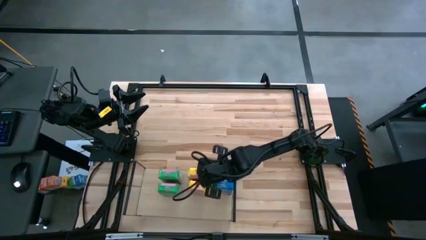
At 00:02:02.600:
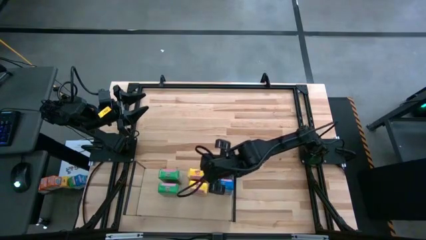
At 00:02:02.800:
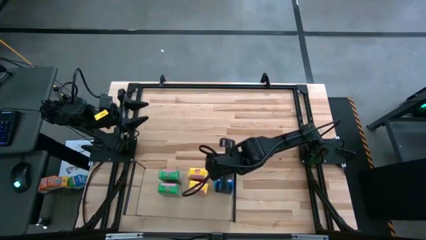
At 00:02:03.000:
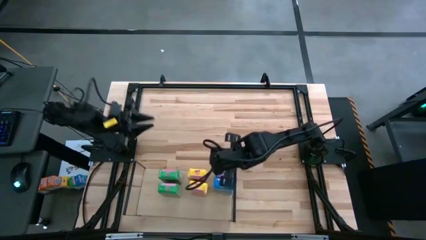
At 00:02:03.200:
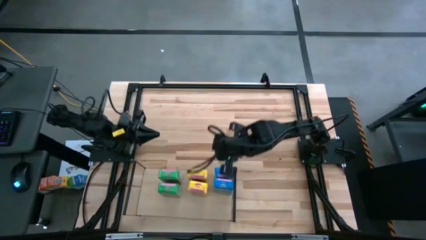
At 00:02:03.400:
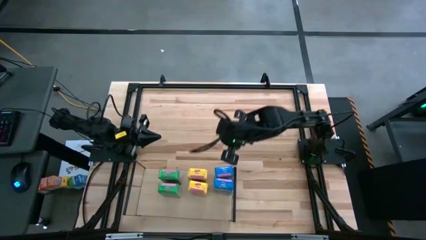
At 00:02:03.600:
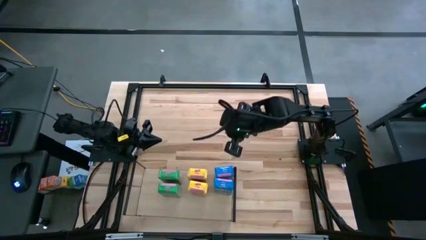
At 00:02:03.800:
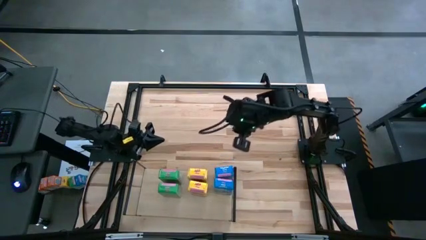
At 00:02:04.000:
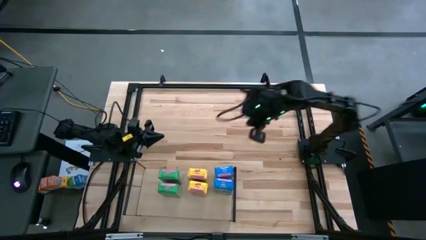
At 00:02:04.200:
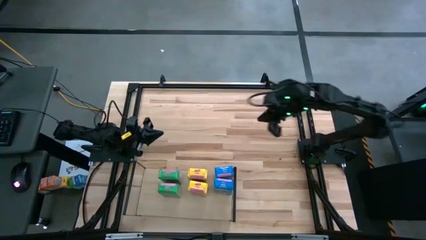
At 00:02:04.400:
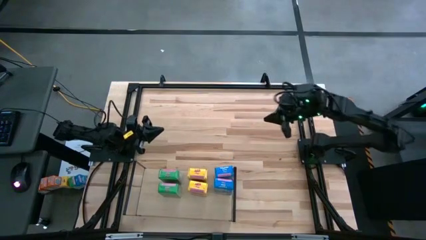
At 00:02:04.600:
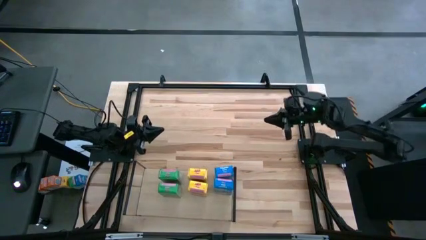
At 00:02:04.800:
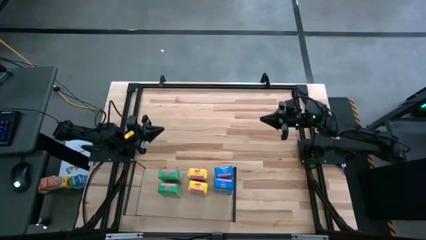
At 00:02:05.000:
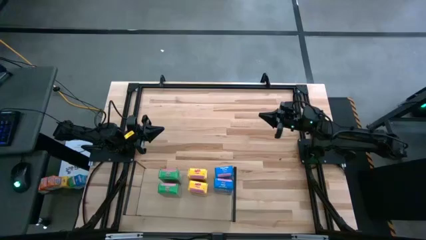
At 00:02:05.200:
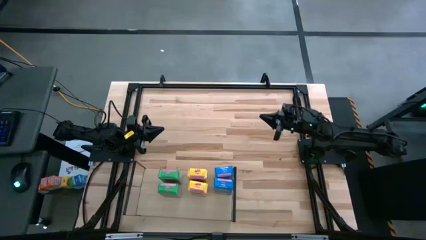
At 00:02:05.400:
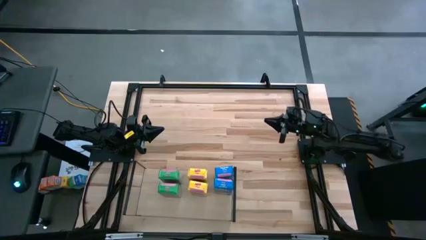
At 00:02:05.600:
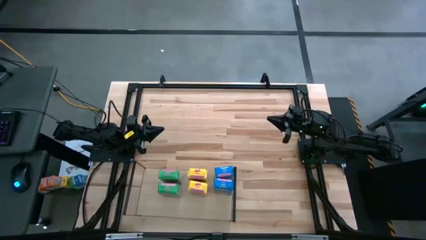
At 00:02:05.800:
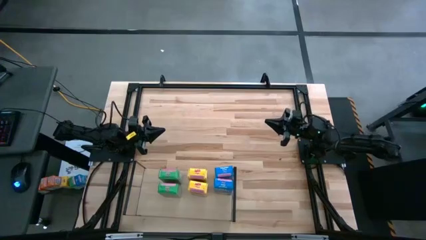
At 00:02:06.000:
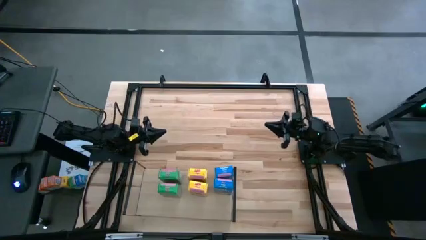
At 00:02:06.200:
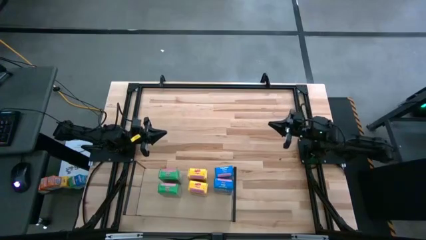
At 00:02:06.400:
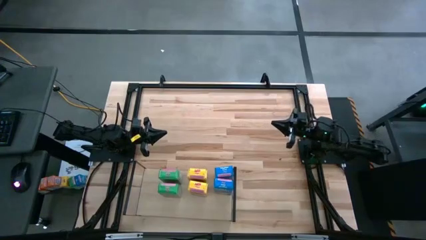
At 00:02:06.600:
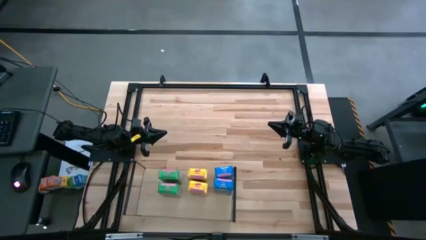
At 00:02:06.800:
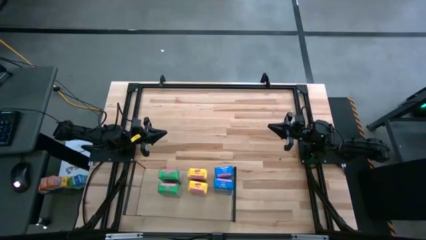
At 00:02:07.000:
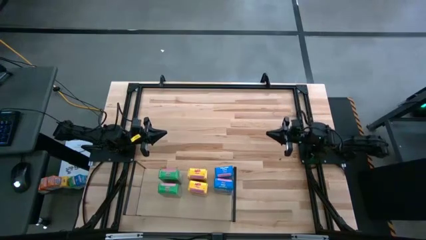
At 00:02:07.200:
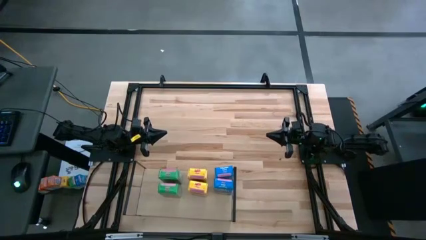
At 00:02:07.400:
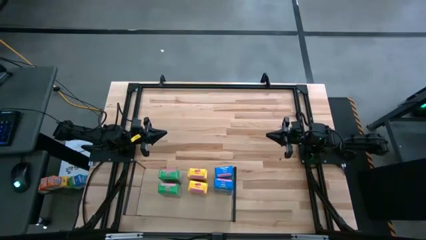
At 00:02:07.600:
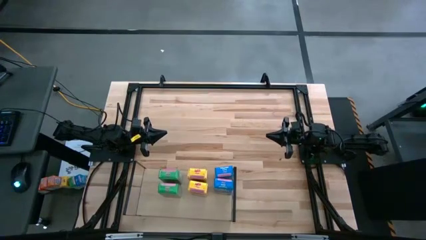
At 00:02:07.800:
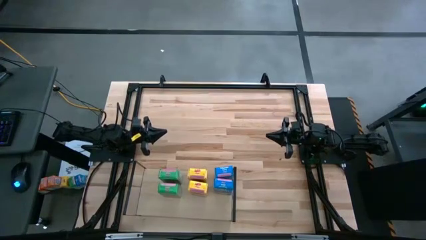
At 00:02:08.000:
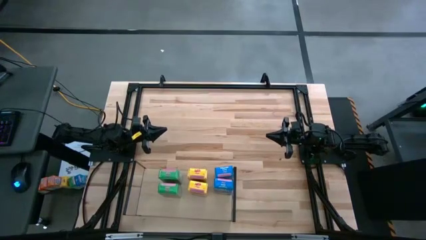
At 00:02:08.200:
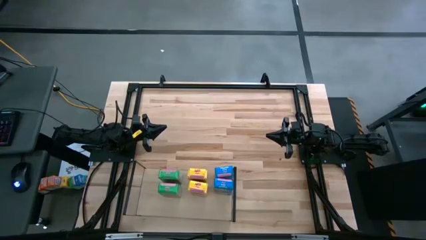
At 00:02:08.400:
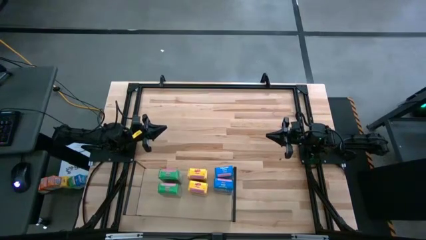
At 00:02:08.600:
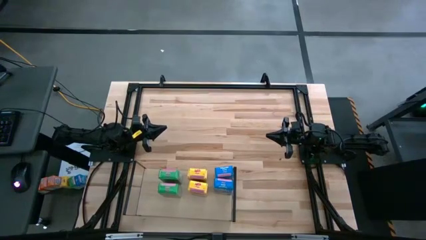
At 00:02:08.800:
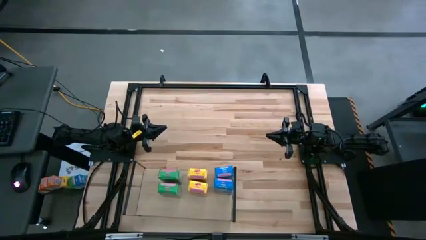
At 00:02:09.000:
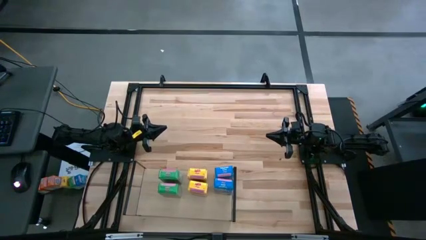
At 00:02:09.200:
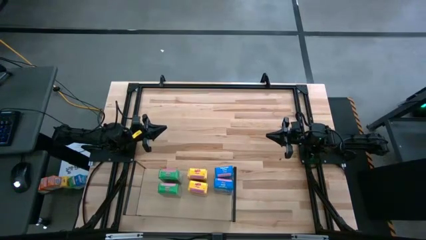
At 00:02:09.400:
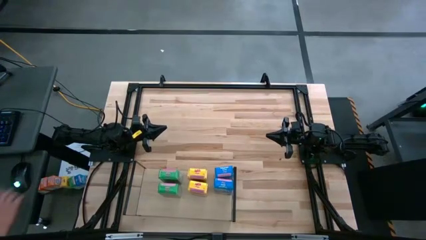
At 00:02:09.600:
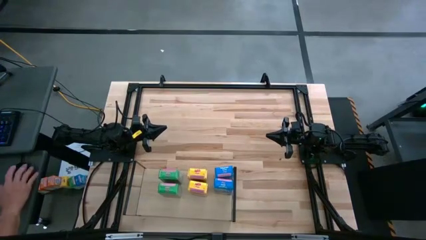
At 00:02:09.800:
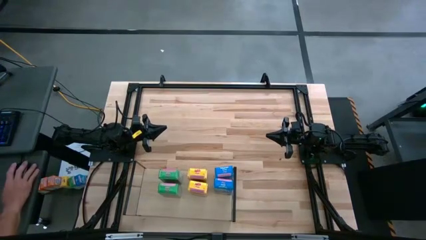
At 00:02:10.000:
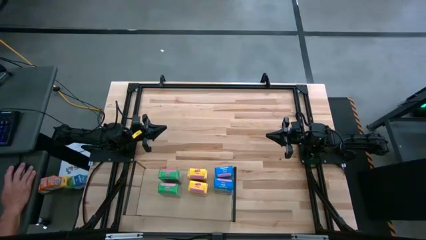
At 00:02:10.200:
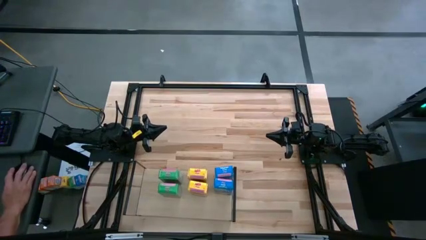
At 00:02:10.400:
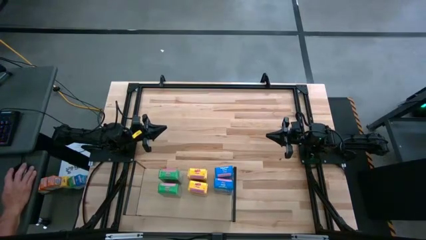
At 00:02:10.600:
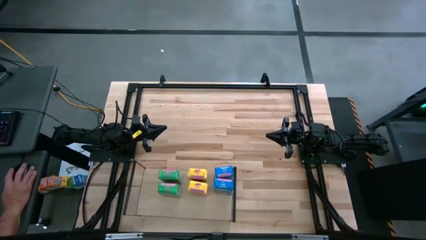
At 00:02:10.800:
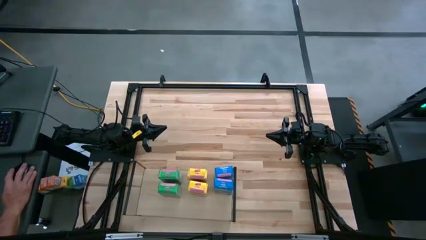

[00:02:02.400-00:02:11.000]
Task: Stack cereal on shelf
Return to Home Position

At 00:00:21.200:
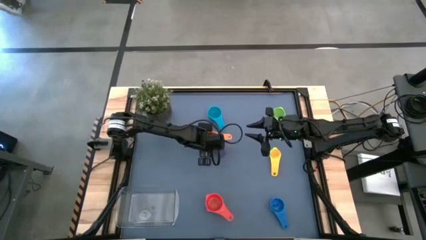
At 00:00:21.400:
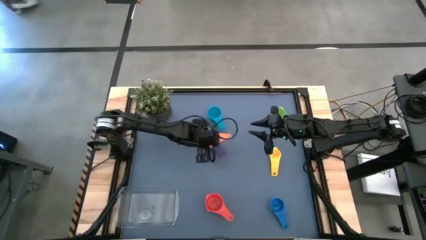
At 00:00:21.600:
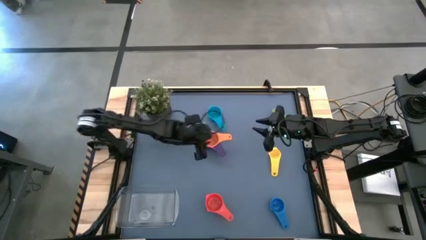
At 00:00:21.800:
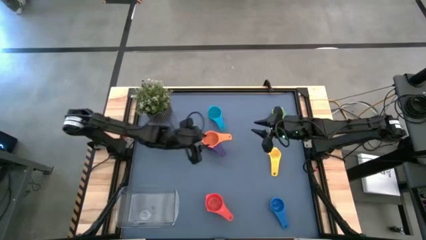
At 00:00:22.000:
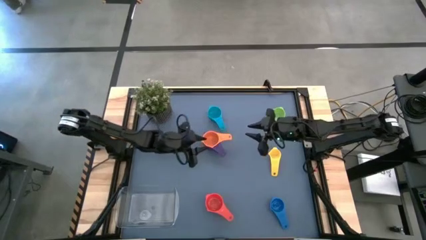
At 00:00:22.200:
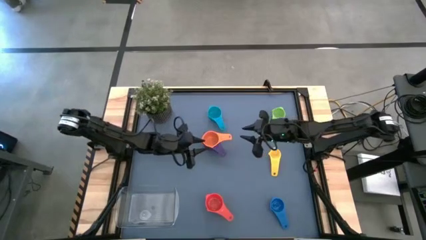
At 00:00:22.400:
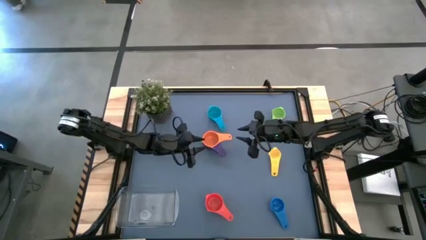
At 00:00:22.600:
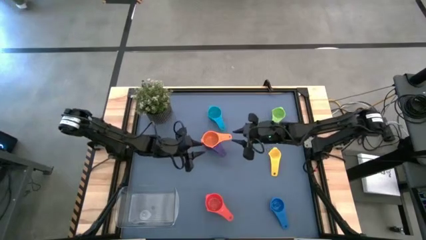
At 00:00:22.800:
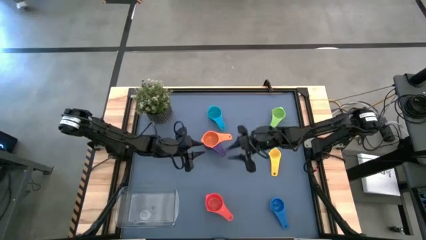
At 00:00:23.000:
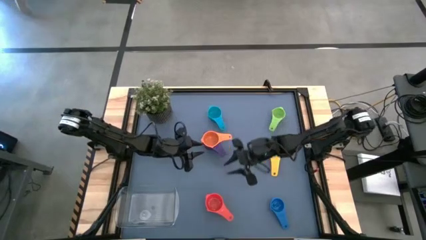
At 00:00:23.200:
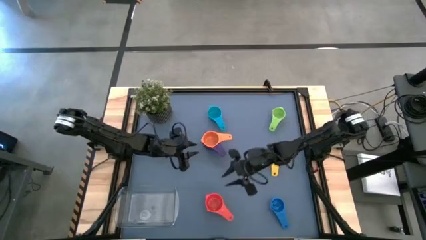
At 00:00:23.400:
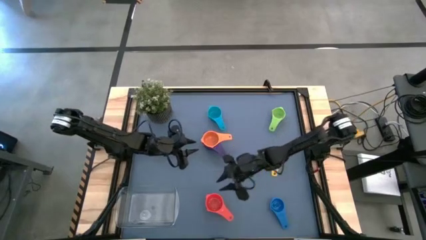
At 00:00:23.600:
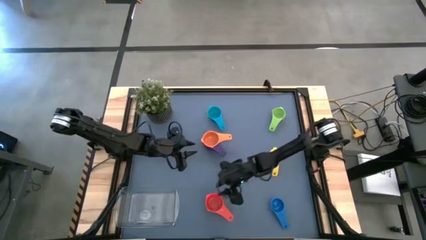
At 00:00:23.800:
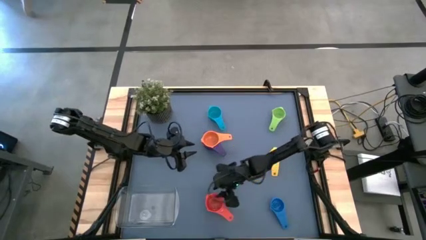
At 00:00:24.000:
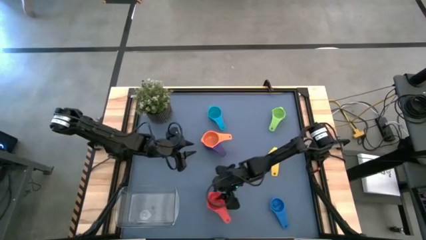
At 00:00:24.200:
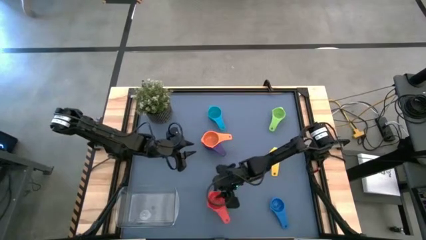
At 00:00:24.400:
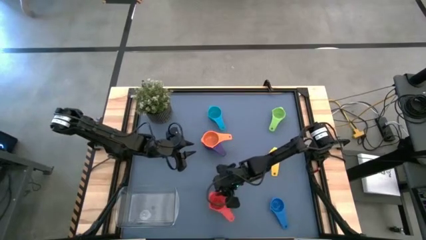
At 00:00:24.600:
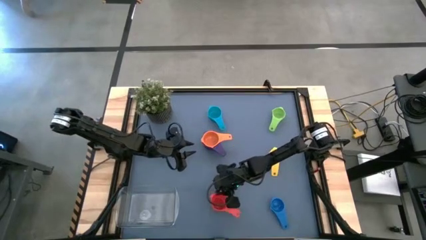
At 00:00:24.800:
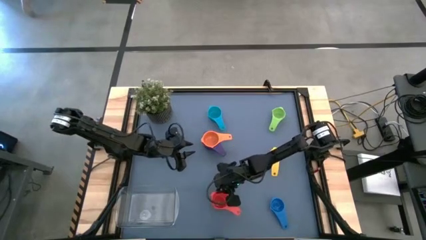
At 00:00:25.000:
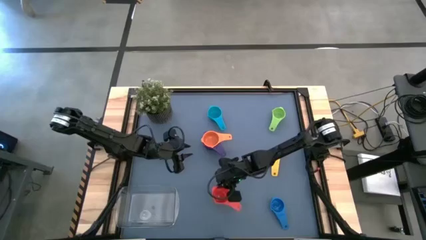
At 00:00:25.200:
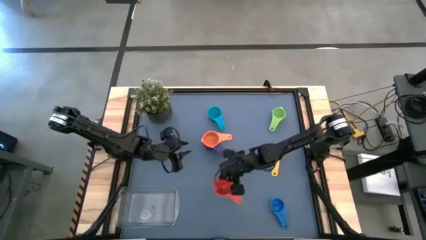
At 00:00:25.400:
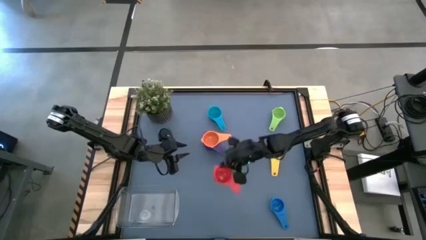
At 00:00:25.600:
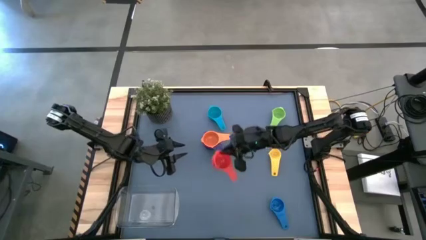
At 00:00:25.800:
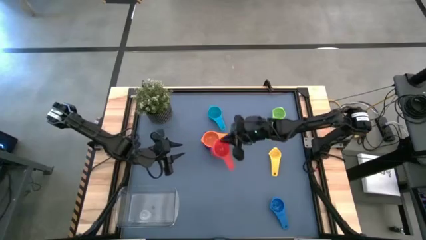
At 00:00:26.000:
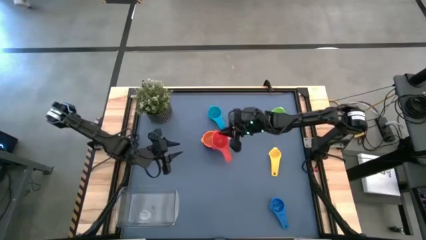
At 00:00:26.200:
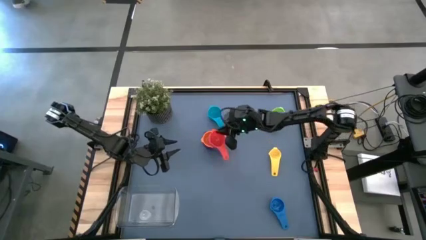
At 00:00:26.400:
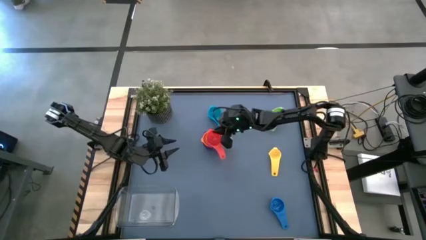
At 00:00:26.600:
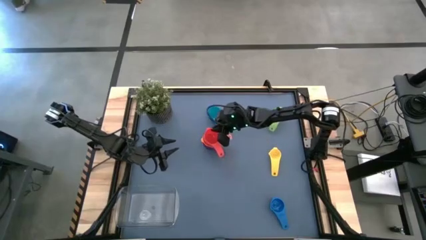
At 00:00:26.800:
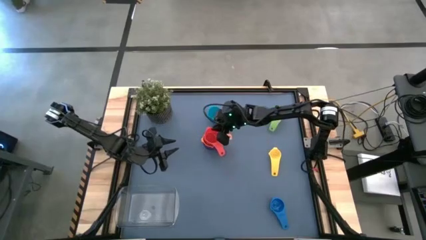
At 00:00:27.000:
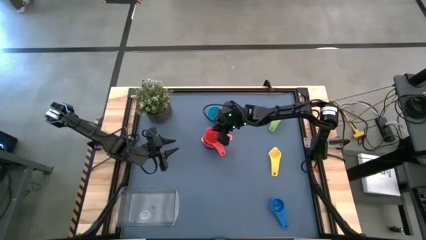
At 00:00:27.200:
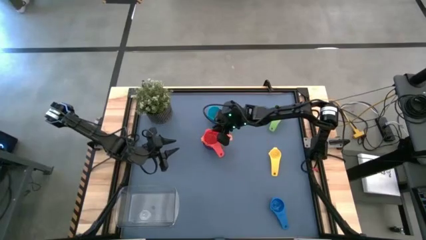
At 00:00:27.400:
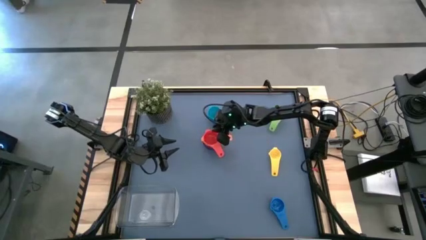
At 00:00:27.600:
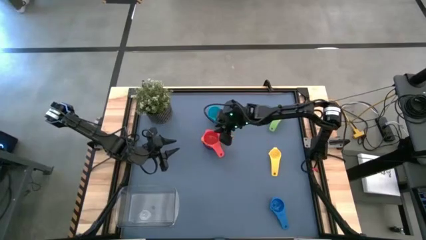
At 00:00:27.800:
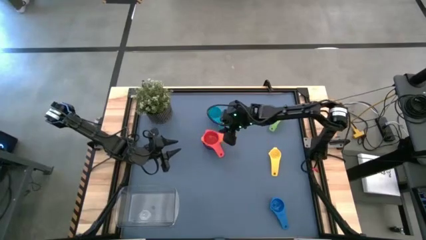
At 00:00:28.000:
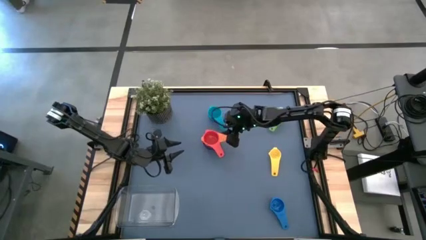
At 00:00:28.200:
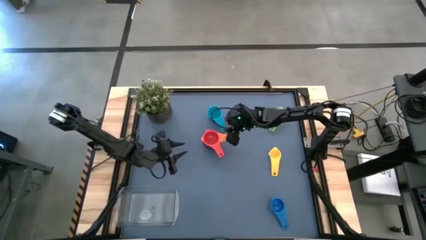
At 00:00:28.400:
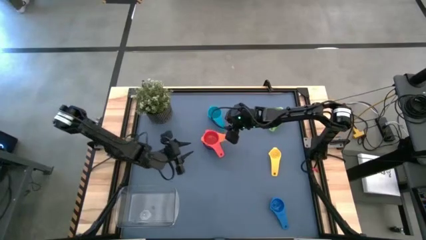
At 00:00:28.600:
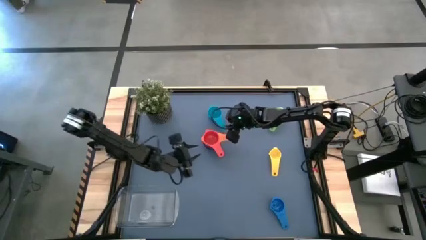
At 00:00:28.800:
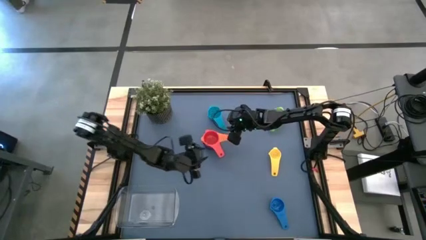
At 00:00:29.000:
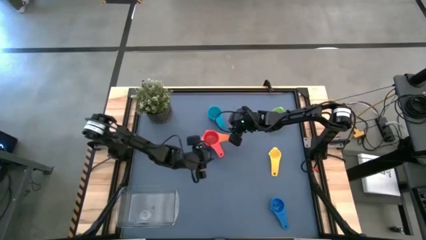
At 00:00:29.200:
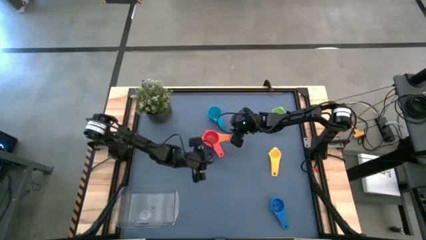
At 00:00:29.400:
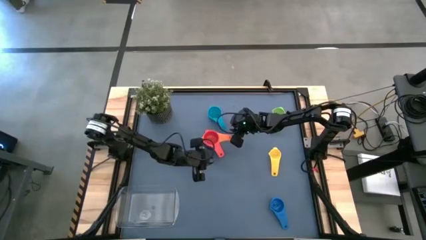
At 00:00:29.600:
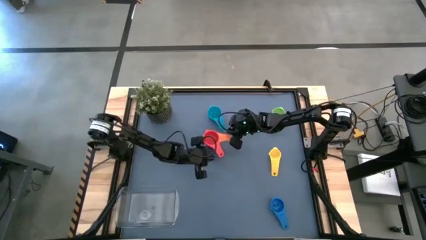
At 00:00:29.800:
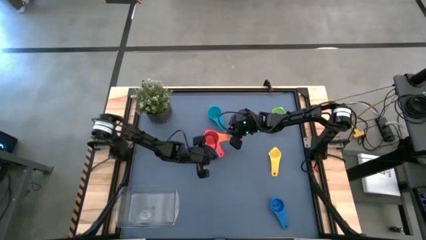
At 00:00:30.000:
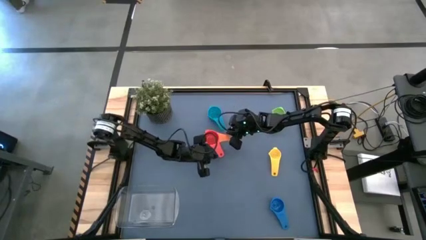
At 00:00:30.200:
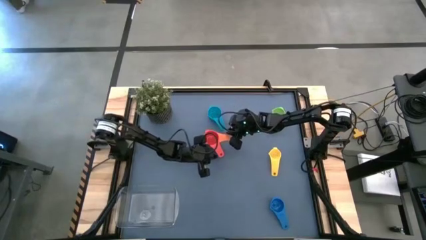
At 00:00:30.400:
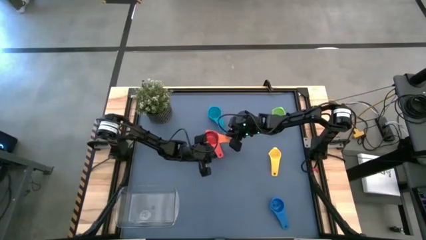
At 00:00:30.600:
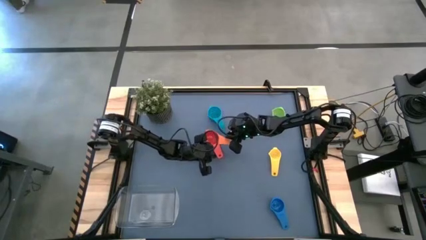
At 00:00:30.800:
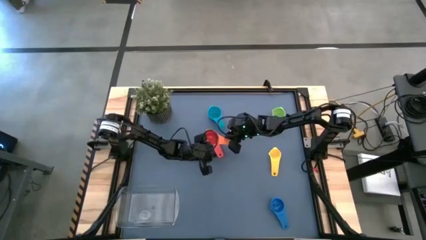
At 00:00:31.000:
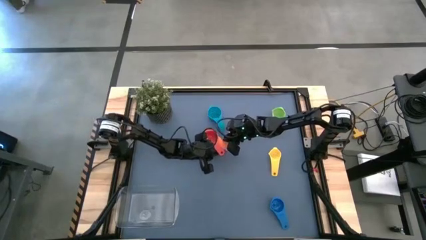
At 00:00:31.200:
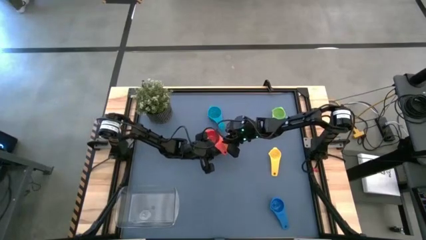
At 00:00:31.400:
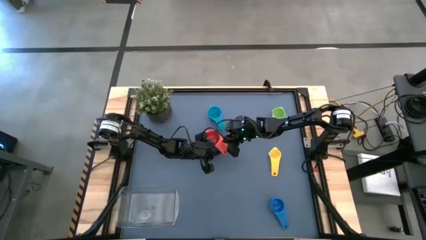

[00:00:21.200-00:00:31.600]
Task: Nest measuring cups in basket
Stack the red measuring cup on top of the orange measuring cup
